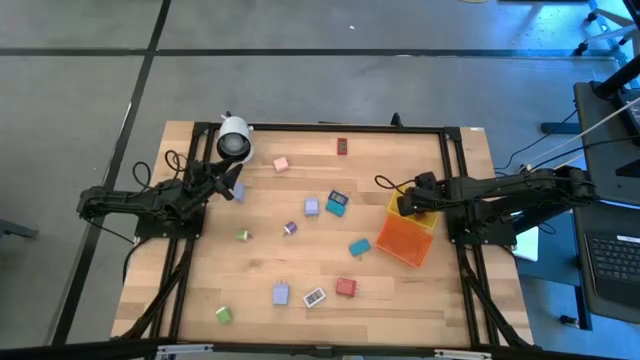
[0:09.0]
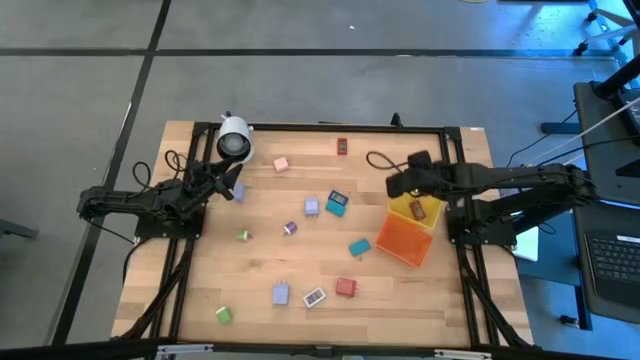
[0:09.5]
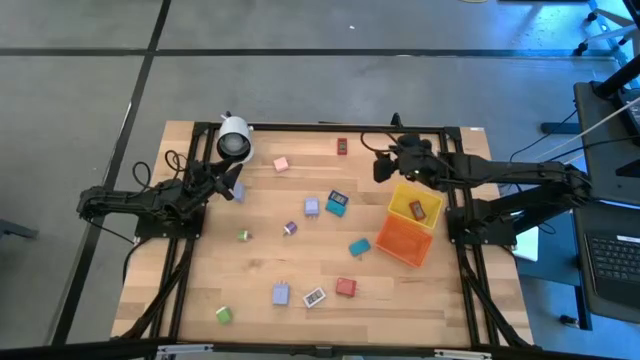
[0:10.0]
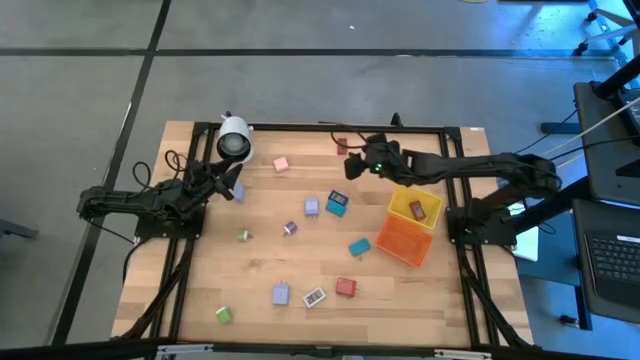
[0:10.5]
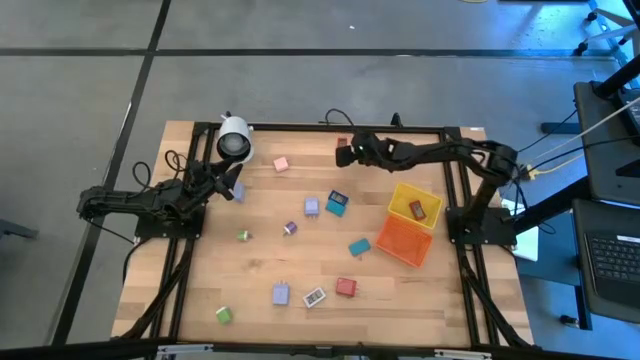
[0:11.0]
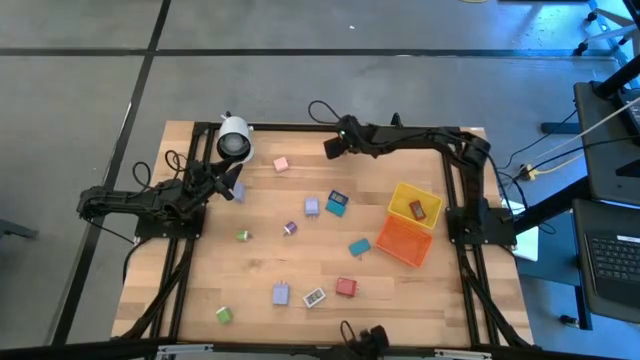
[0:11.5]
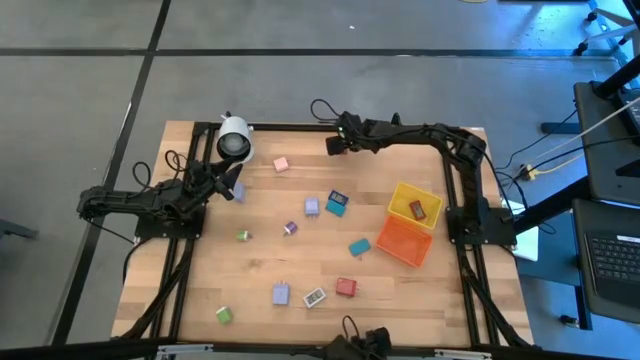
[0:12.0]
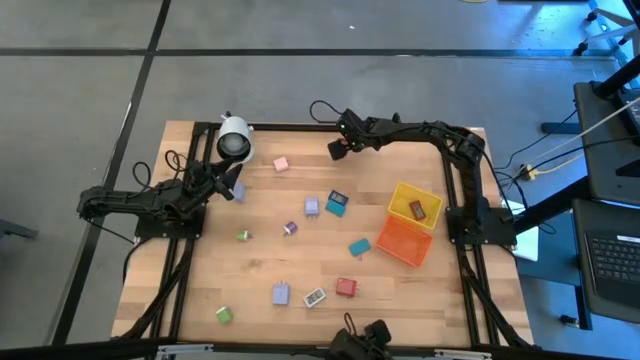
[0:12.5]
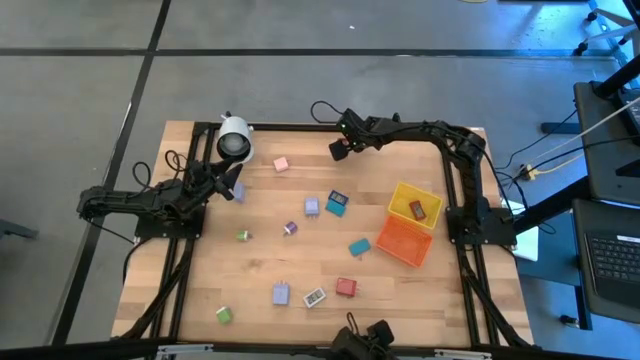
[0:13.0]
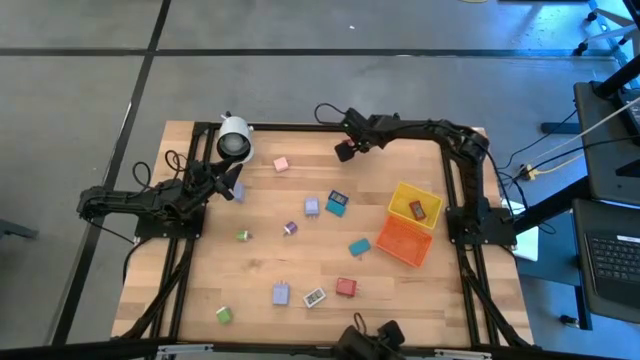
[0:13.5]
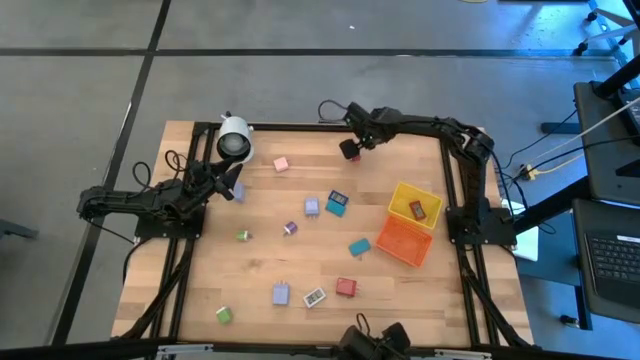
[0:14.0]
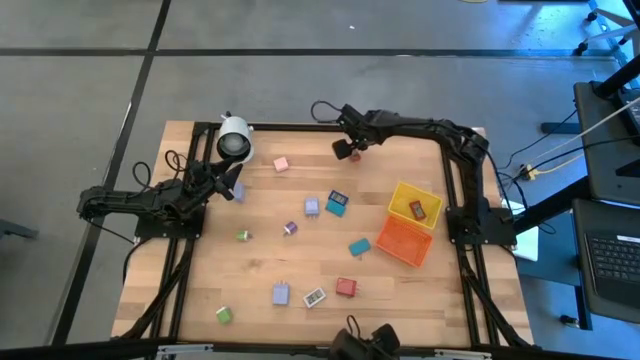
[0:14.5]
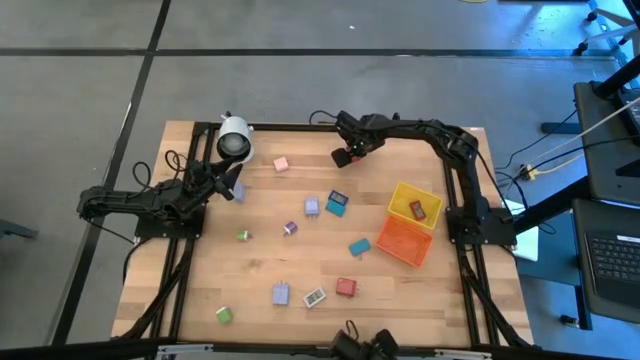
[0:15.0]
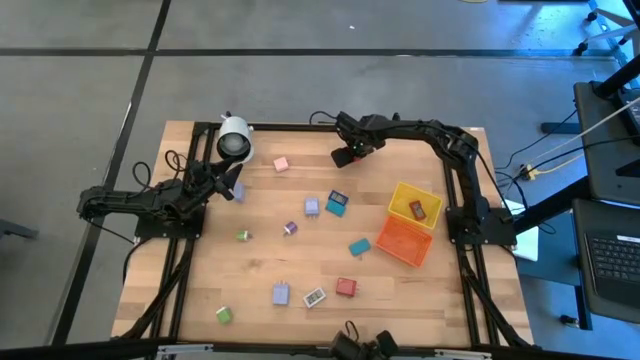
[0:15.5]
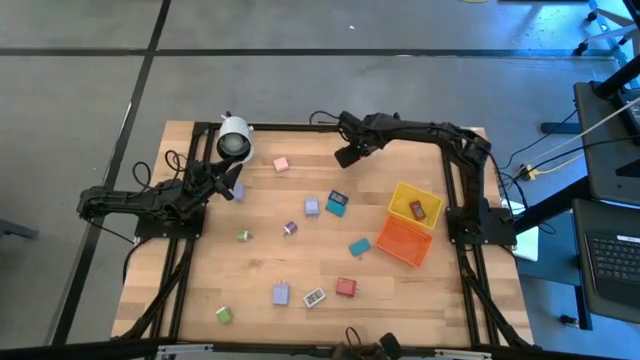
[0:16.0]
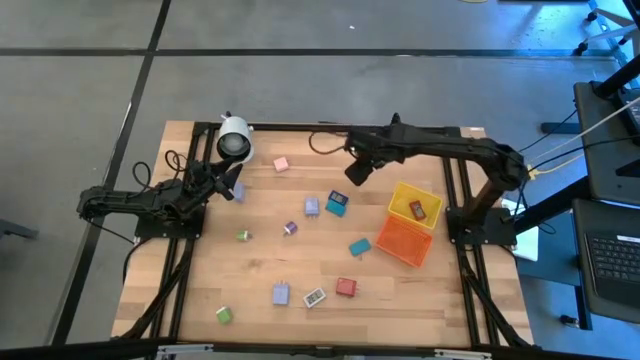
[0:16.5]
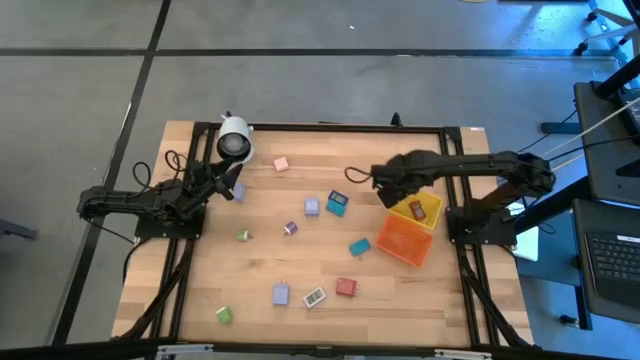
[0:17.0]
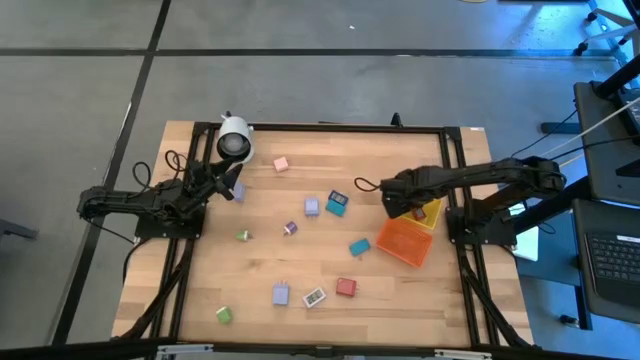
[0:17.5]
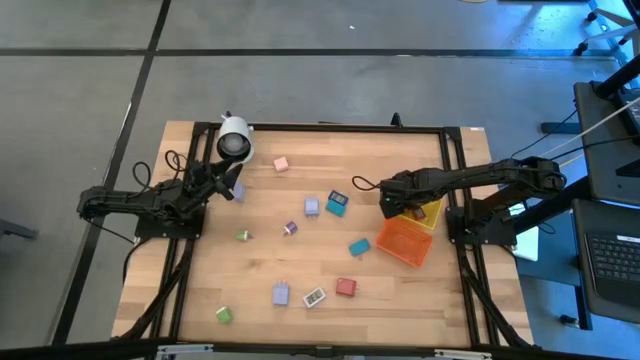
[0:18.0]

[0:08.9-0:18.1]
Task: Pick & Place Office items
Put the red digital timer into the yellow basket

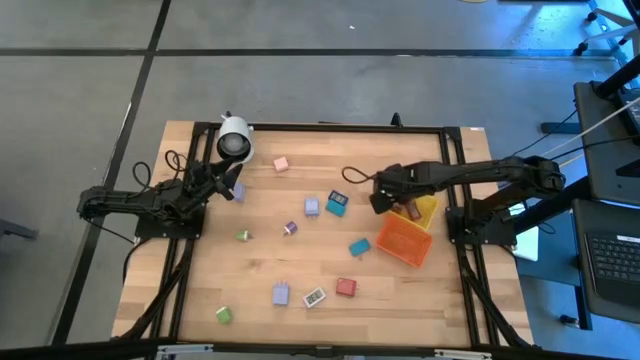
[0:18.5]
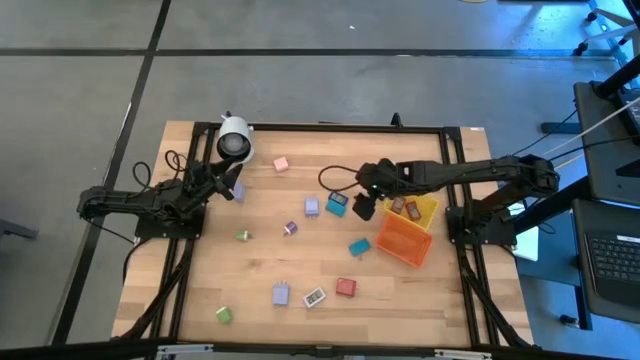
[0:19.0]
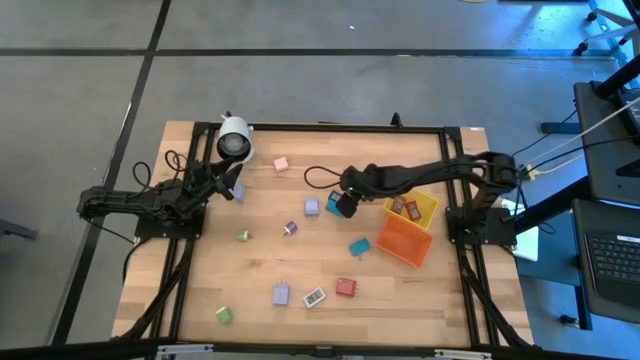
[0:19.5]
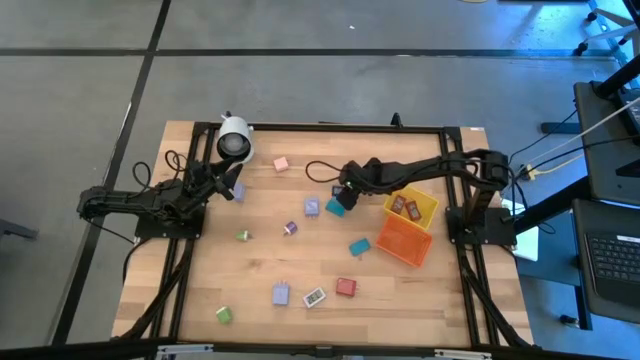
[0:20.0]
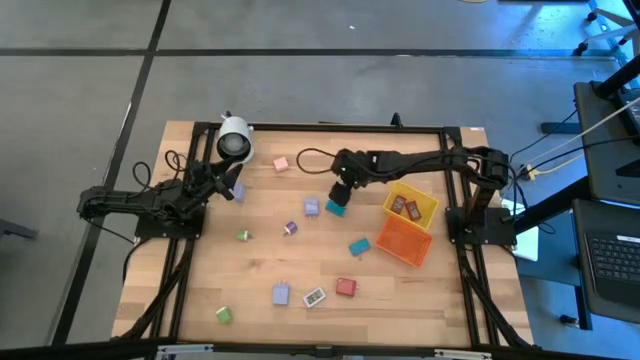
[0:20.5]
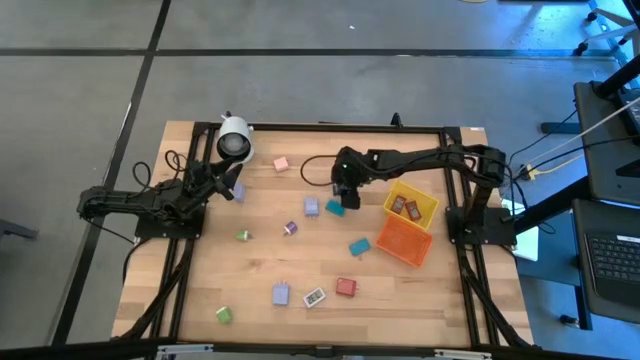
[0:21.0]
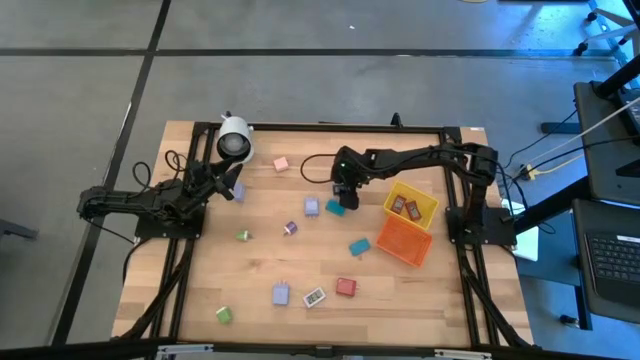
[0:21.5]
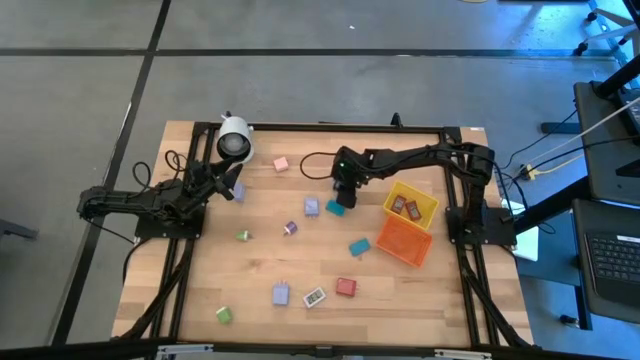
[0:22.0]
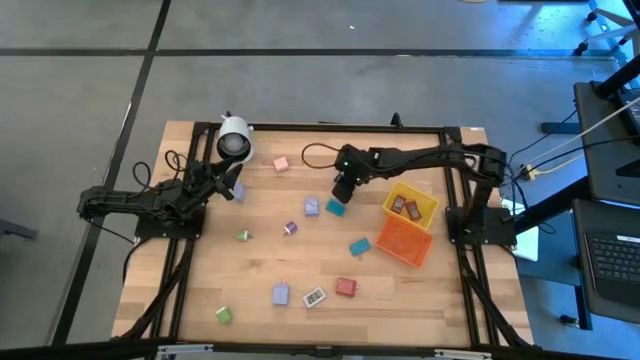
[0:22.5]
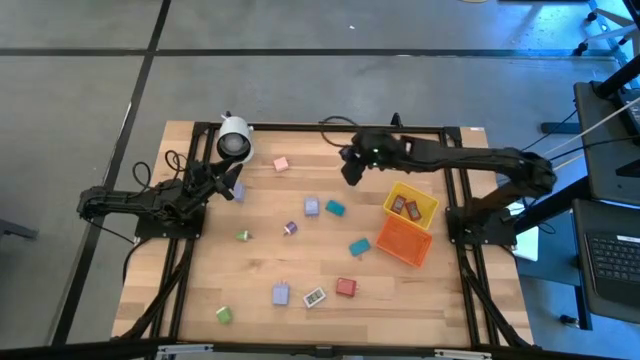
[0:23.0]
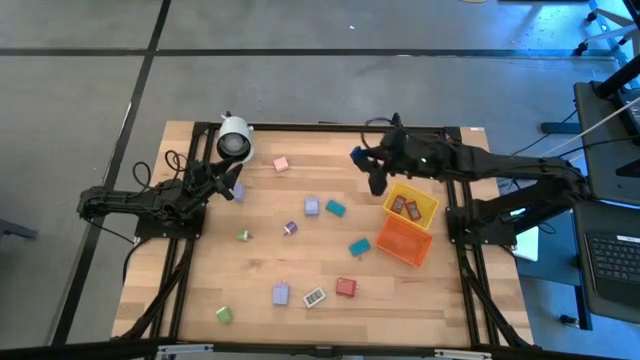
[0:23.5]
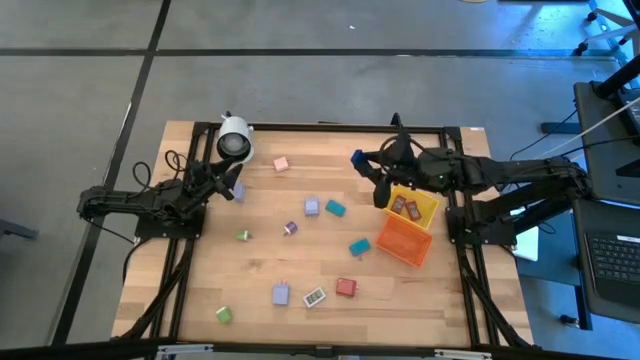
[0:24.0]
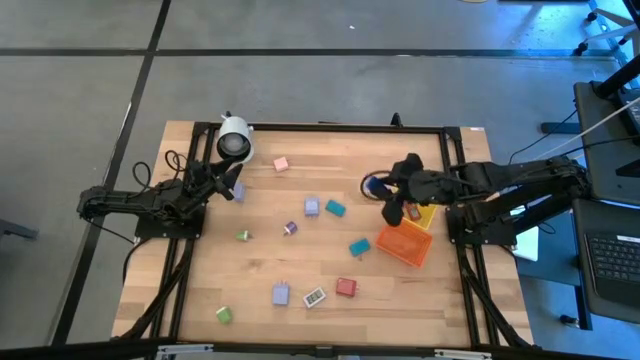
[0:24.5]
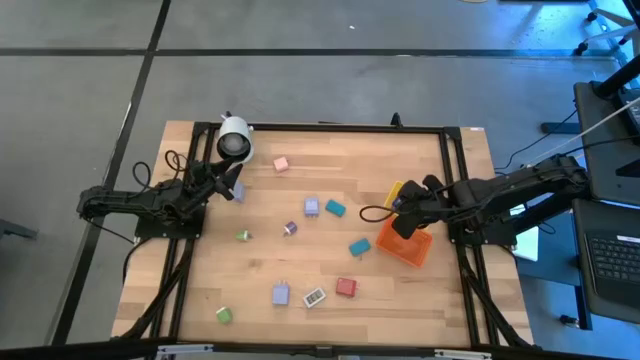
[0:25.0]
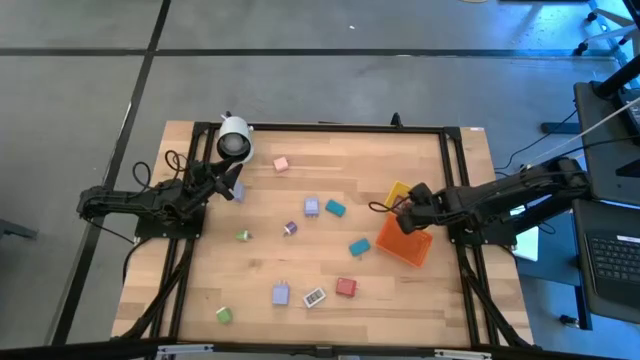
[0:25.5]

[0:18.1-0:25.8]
Put the blue digital timer into the yellow basket

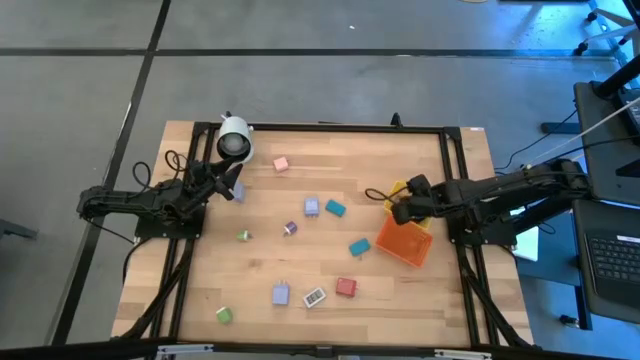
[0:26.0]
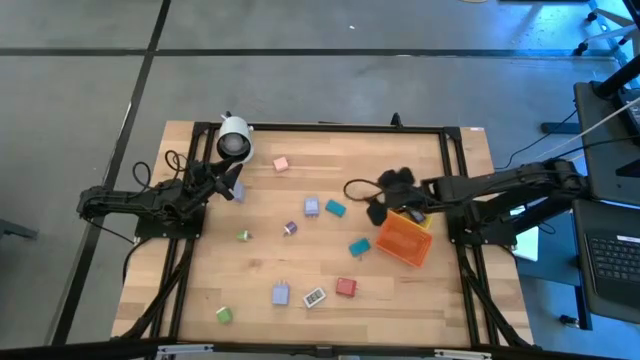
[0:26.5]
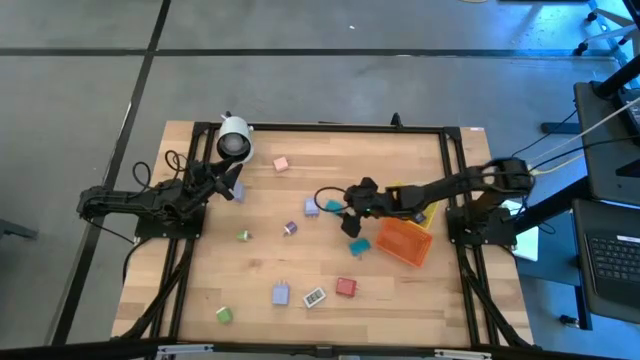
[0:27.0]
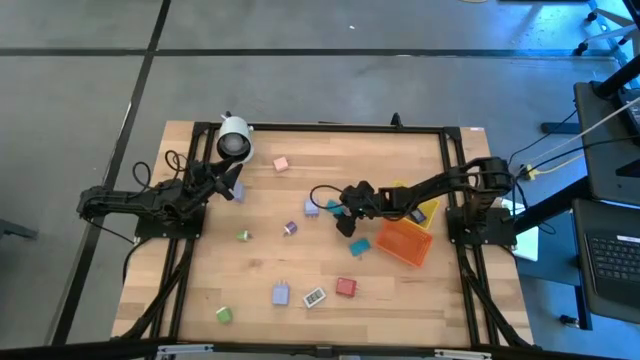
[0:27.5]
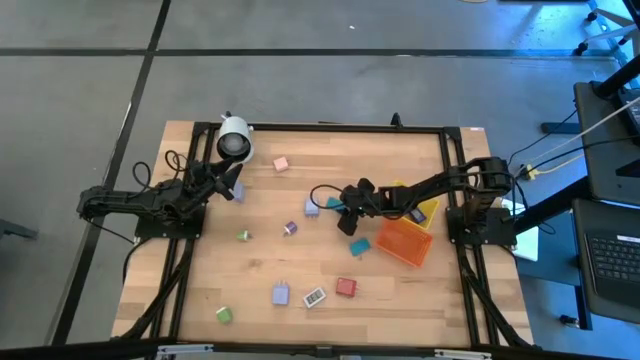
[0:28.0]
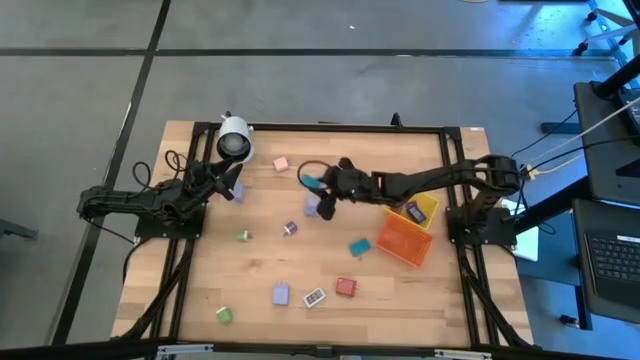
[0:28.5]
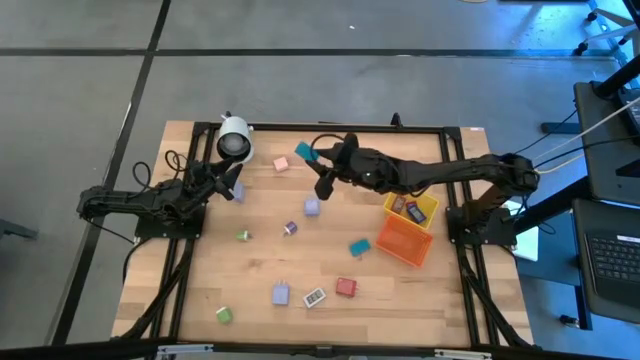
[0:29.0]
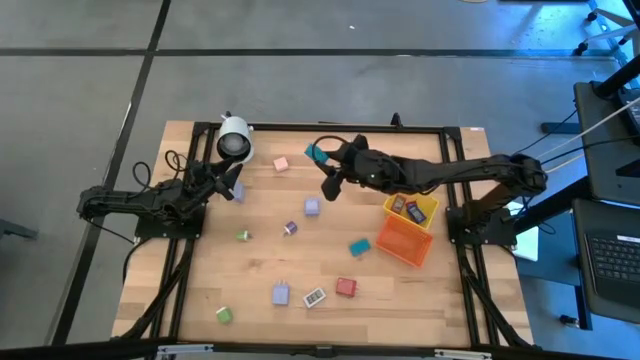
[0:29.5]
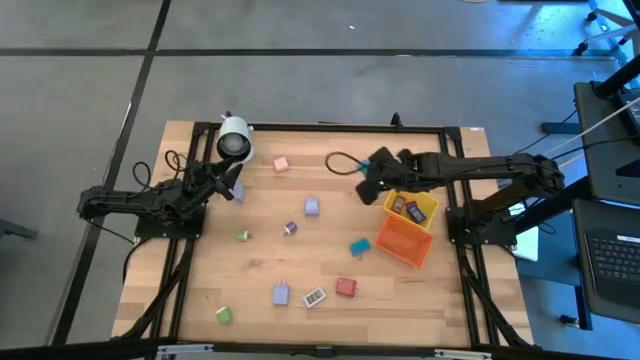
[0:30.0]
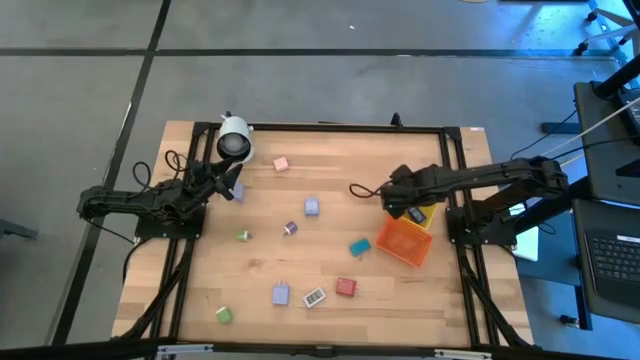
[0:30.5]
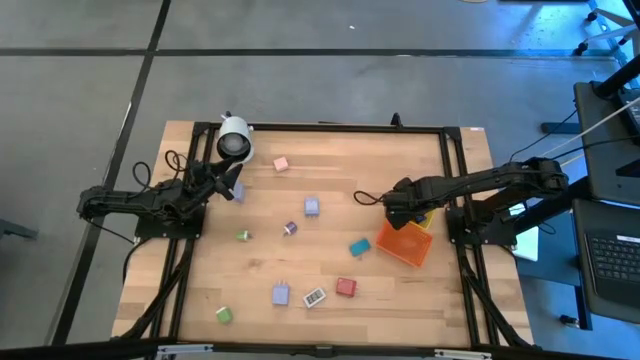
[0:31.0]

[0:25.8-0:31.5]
Put the top light blue digital timer into the yellow basket

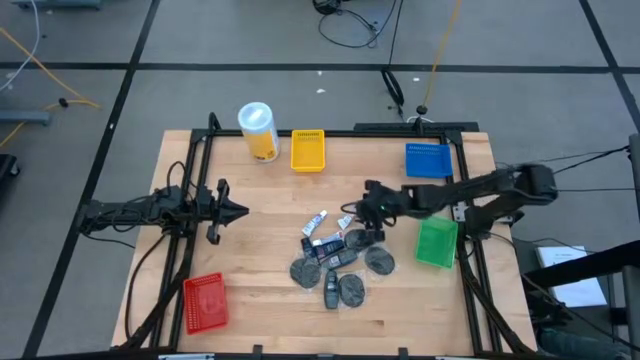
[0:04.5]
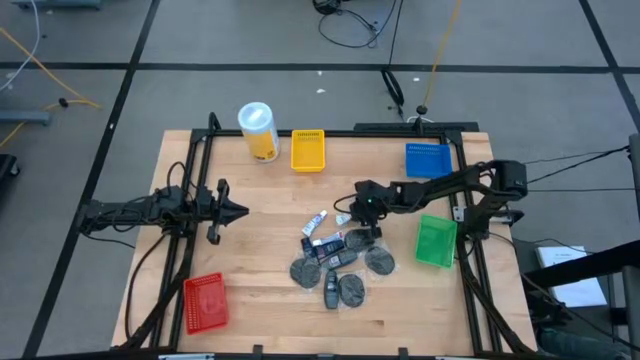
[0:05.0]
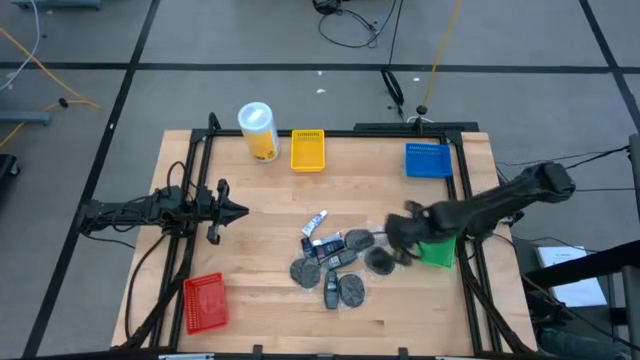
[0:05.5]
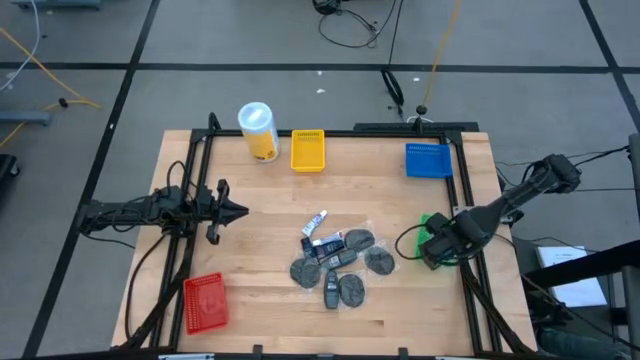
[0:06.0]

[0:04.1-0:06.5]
Task: Pick & Place Travel size toiletries
Put the toothpaste into the green bin
